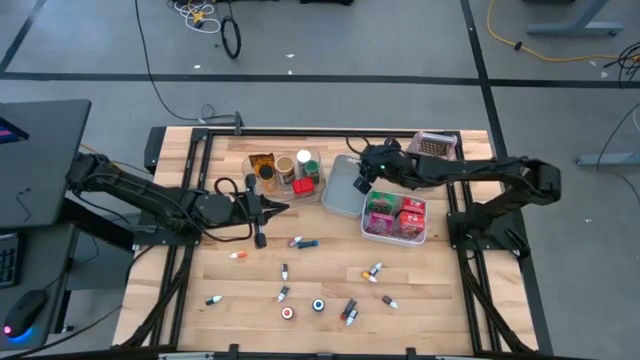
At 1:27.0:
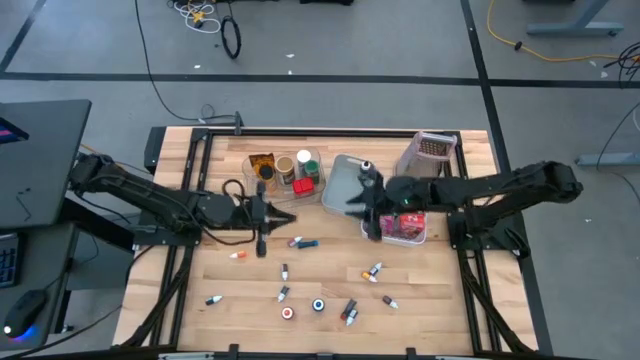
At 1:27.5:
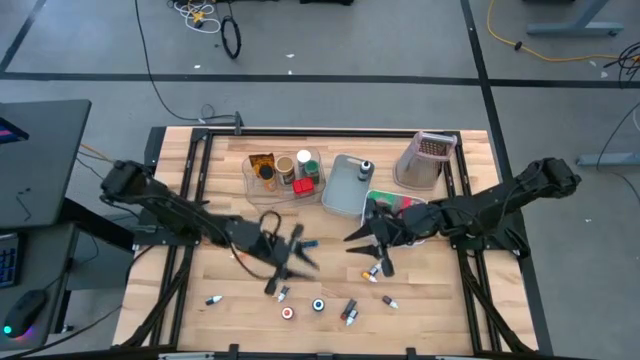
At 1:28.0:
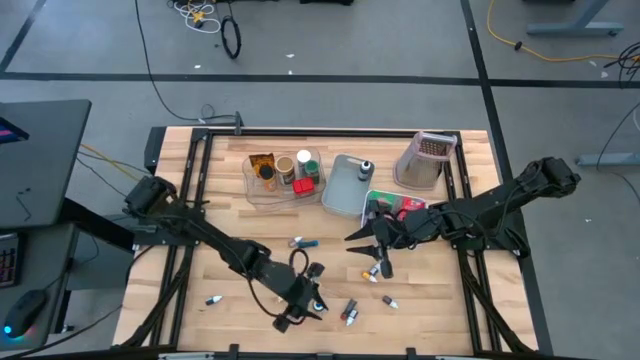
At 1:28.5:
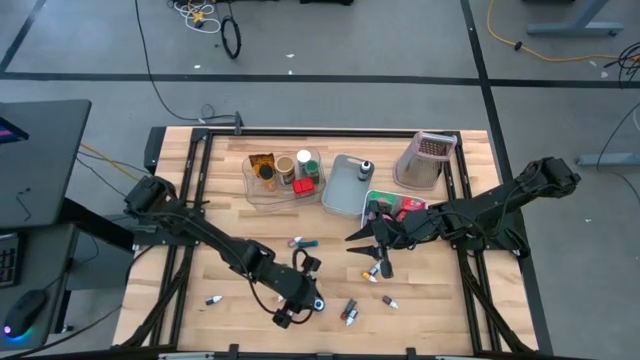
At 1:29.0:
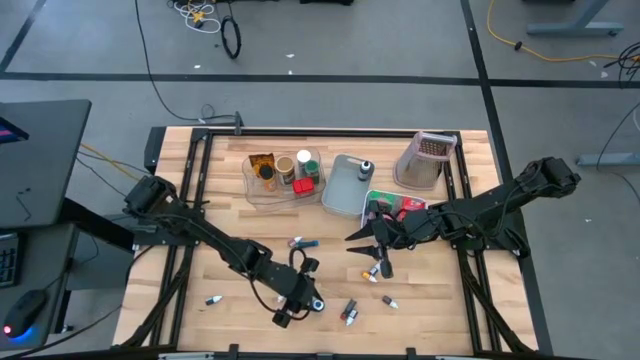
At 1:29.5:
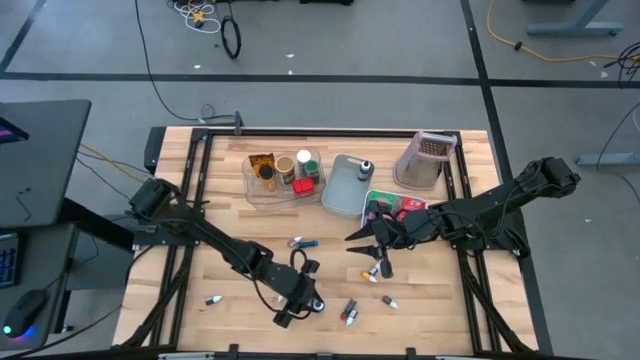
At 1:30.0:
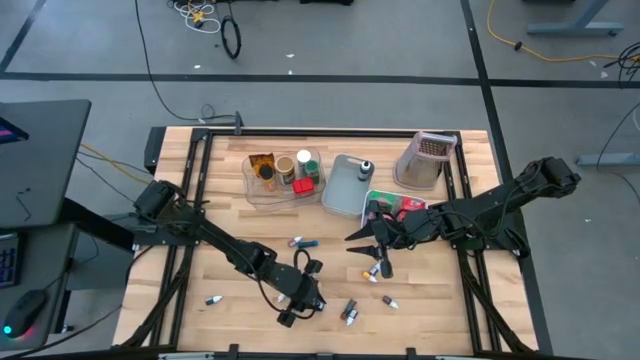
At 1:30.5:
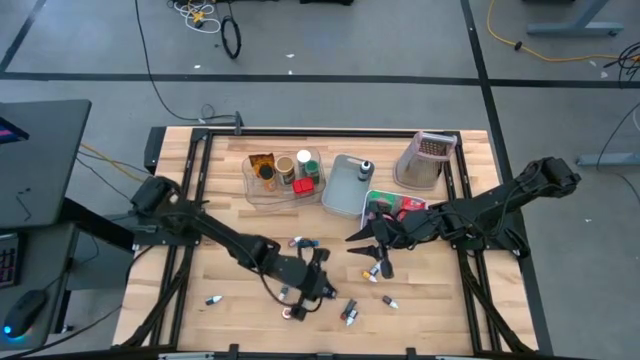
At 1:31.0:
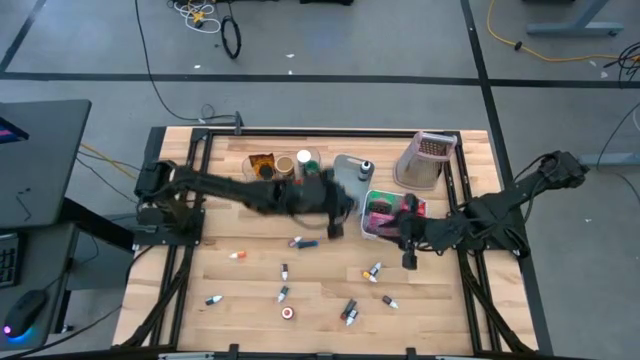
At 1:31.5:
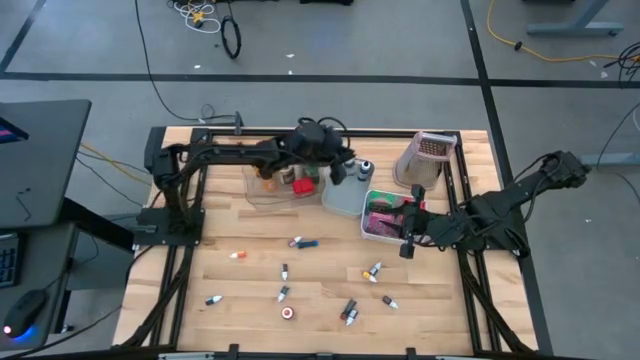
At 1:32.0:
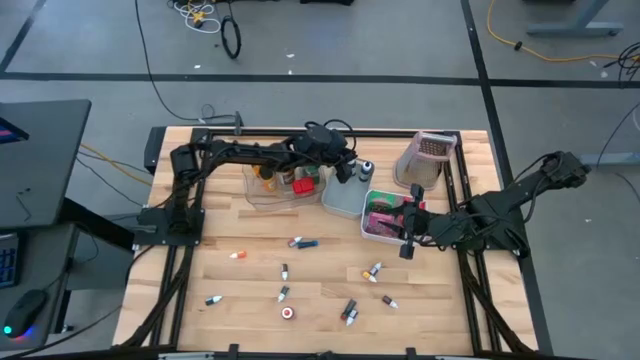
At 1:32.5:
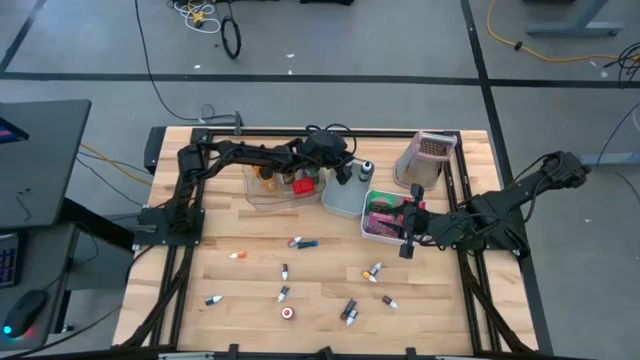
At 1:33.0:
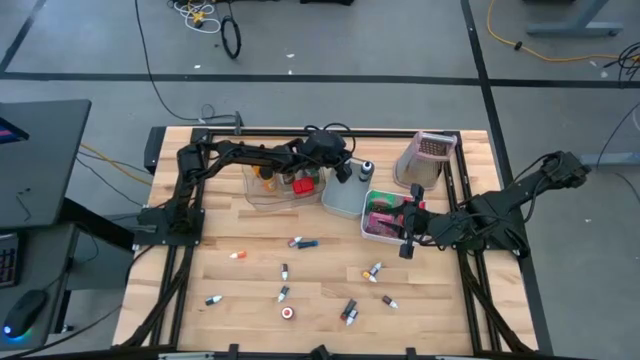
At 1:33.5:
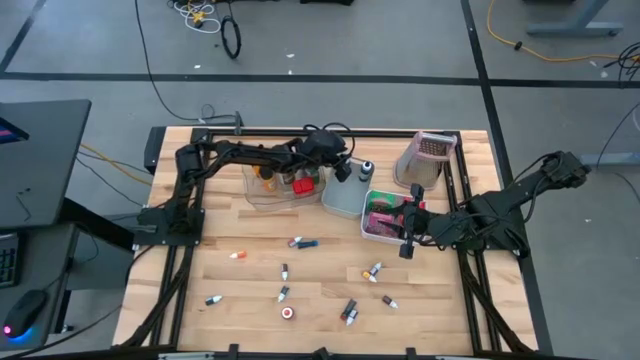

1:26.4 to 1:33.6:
Task: Pick & Place Kitchen Items
Put the big blue food coloring bottle into the gray bin

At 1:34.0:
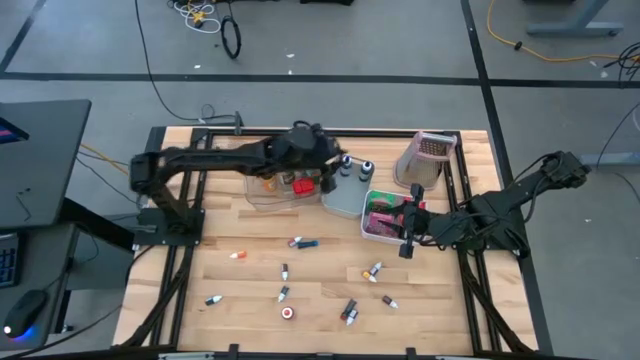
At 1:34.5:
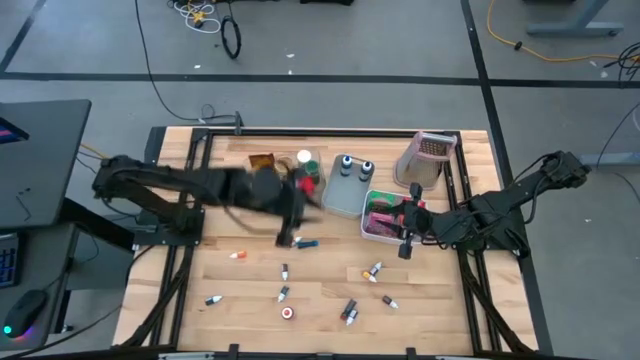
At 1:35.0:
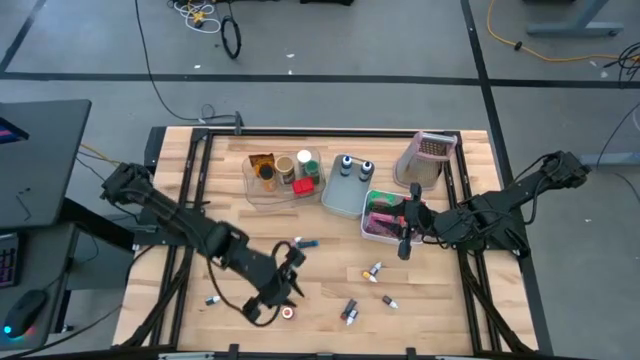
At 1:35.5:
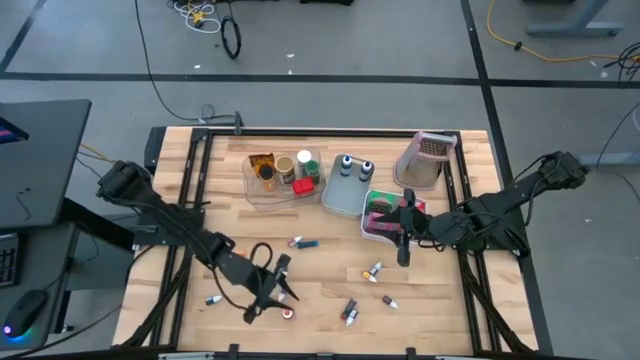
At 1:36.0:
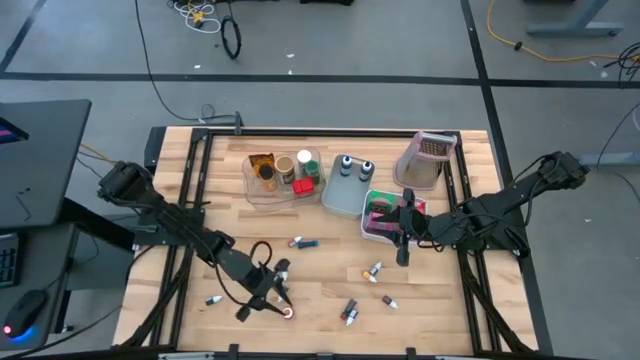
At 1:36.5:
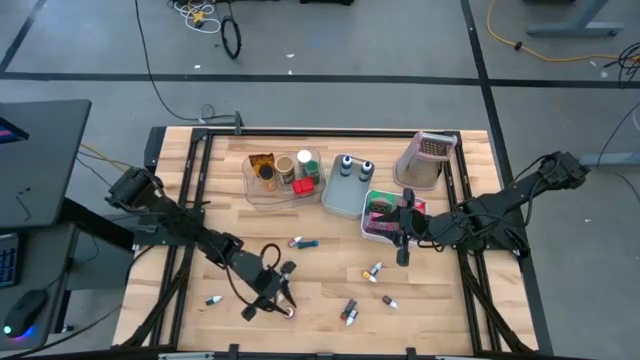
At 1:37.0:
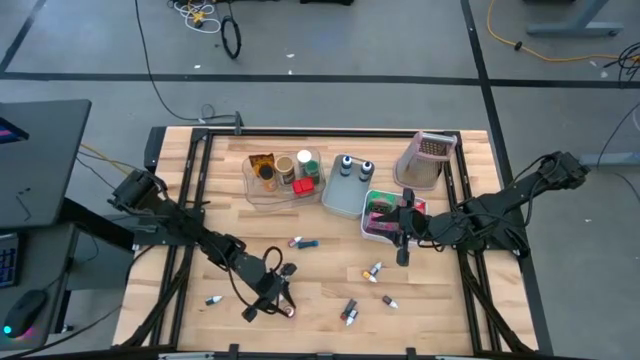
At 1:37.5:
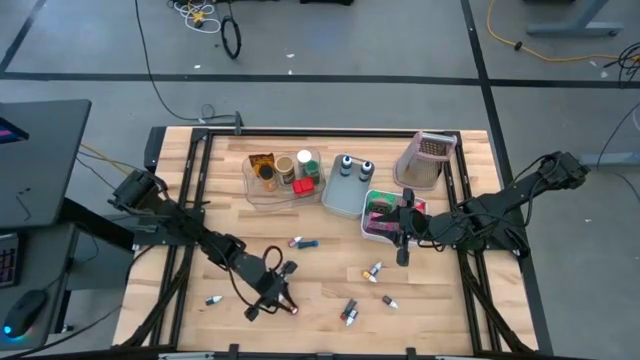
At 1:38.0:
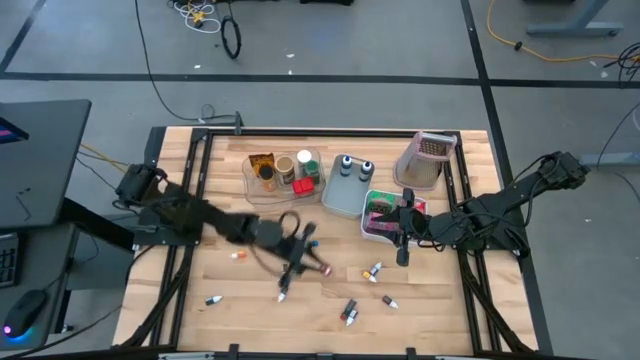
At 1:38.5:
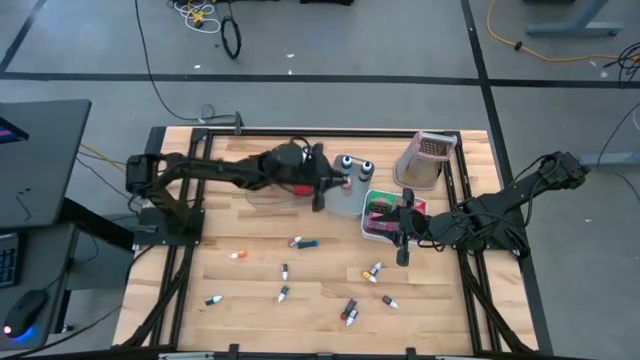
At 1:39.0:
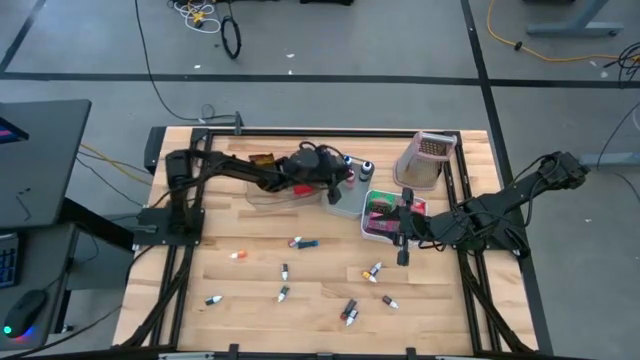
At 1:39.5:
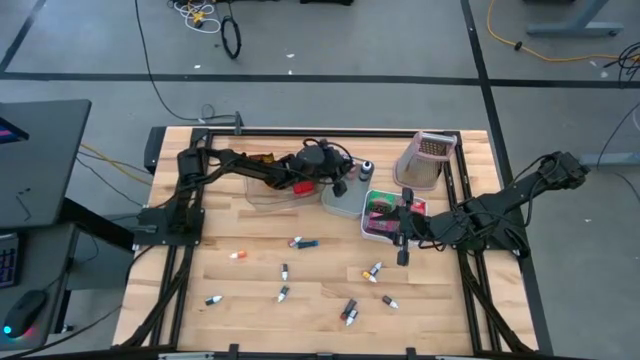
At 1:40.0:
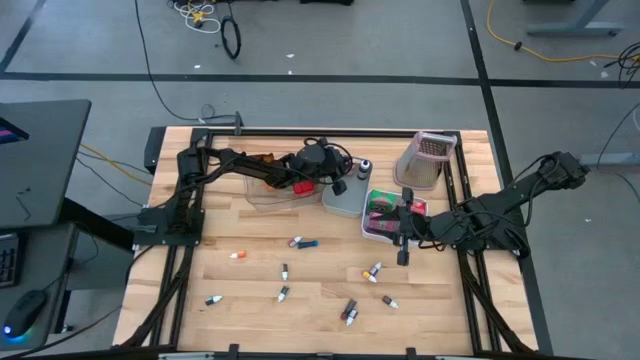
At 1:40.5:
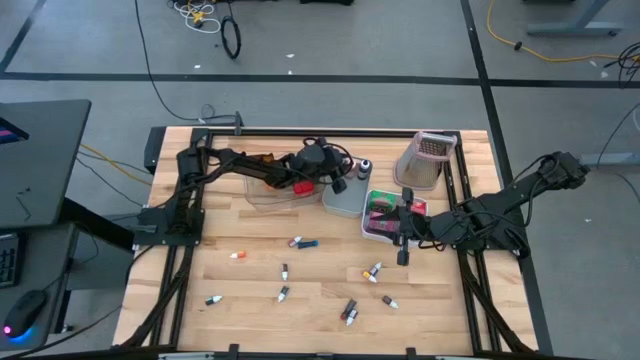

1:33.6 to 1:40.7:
Put the big orange food coloring bottle into the gray bin

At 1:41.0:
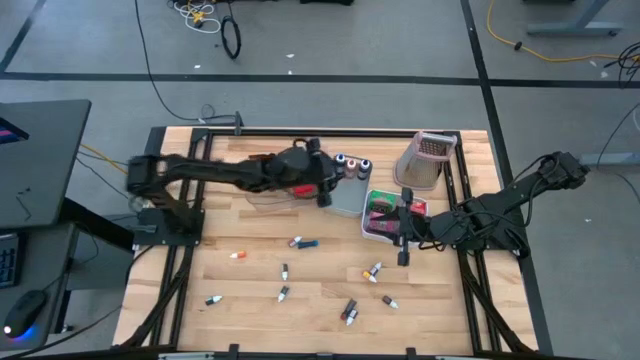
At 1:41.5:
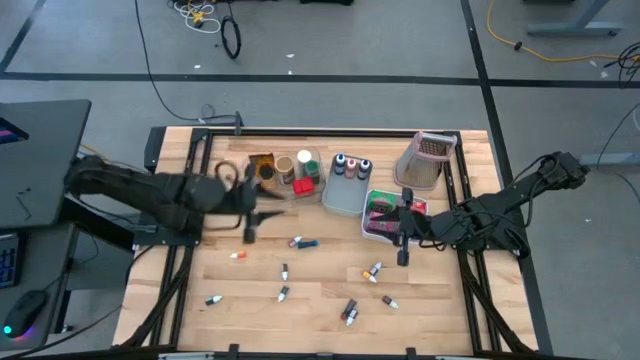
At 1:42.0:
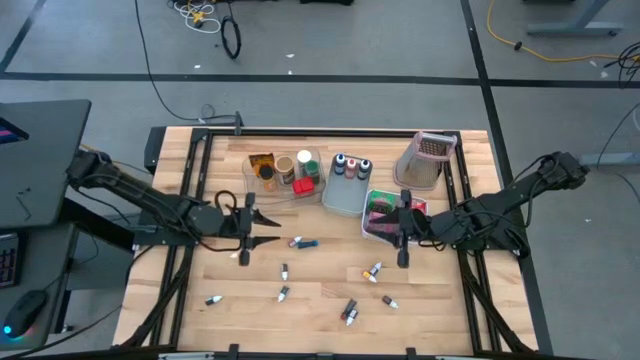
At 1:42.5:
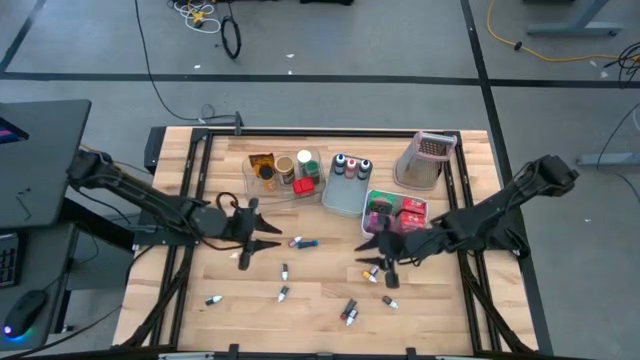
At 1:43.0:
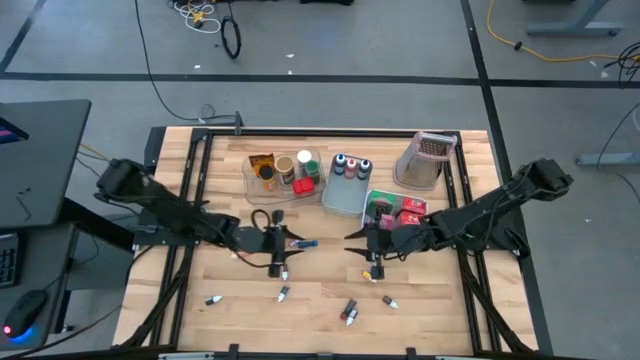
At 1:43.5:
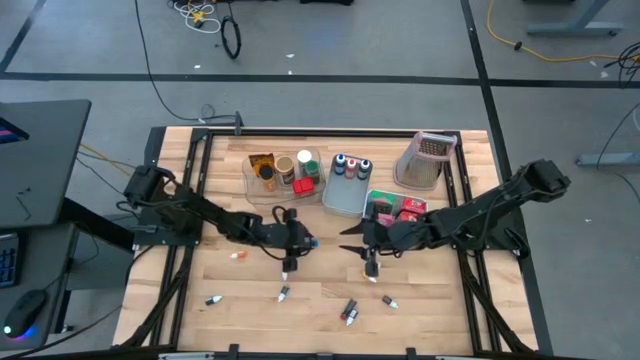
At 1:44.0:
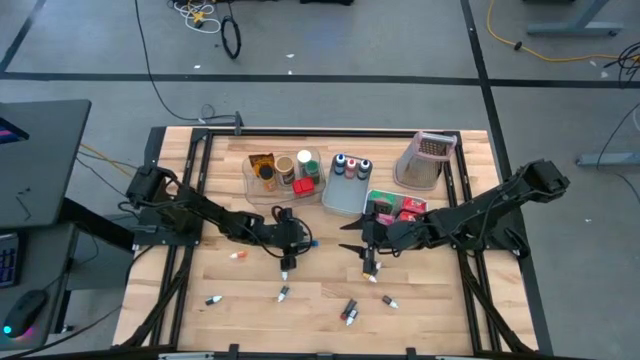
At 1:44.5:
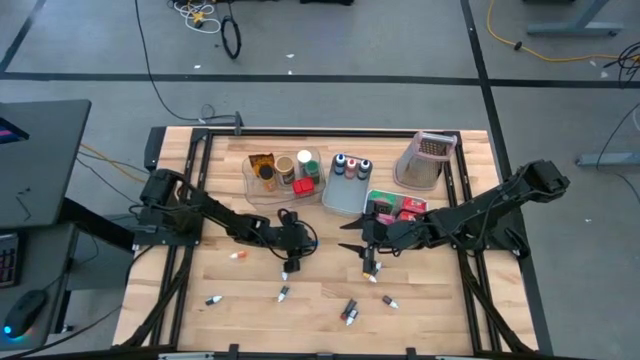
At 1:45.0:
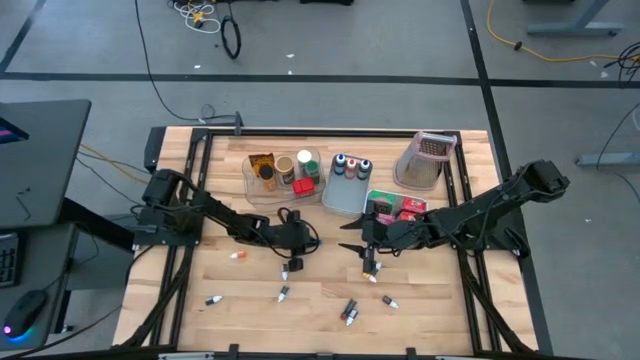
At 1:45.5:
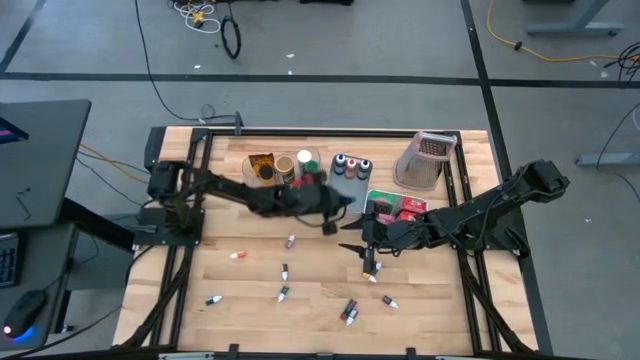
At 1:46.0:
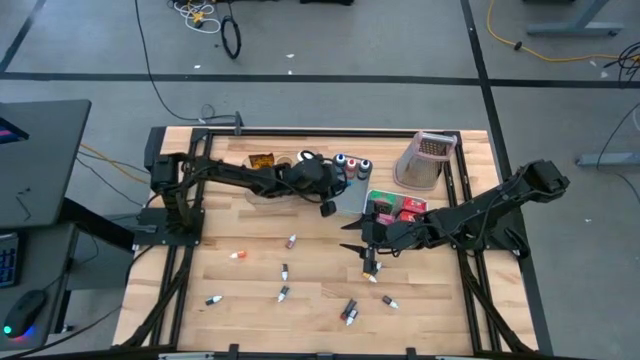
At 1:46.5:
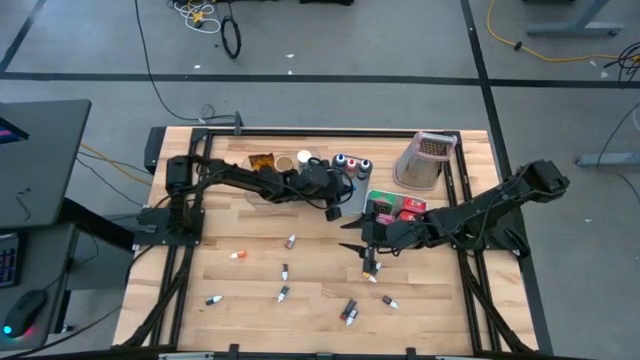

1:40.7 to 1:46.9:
Put the small blue transparent food coloring into the gray bin

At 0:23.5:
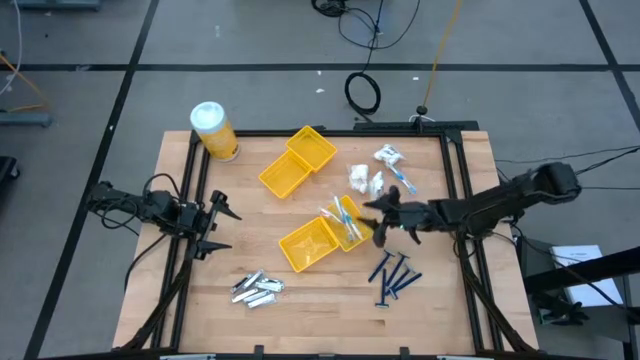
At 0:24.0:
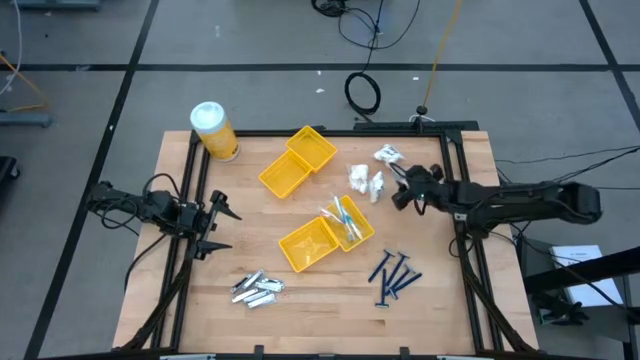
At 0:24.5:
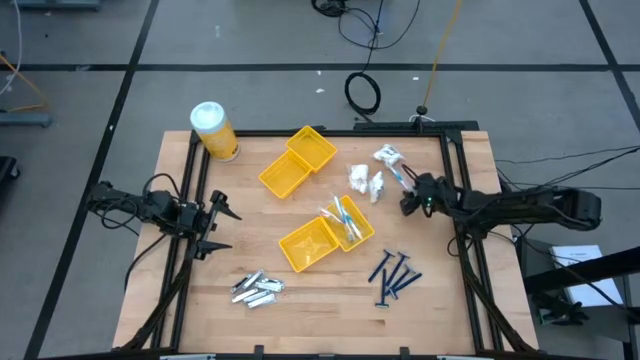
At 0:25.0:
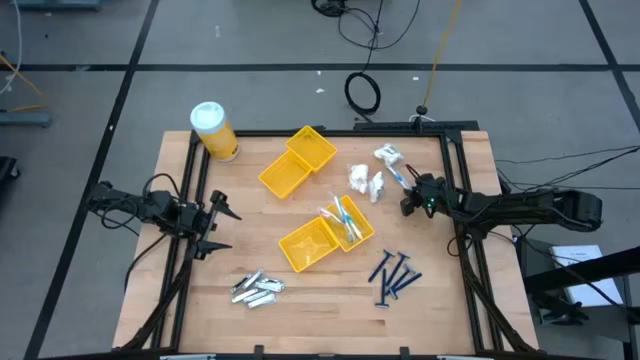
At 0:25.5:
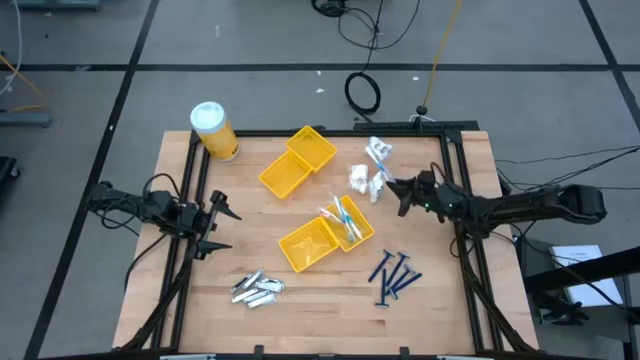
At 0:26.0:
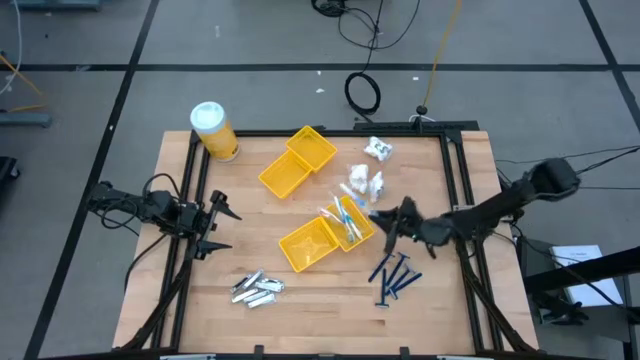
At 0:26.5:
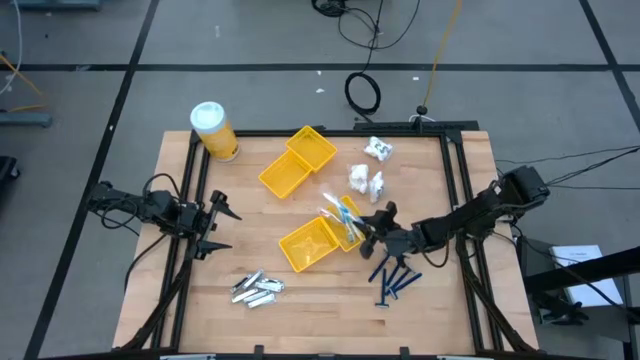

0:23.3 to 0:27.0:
Task: Pick & Place Travel size toiletries
Put the blue toothbrush into the bottom right yellow basket
